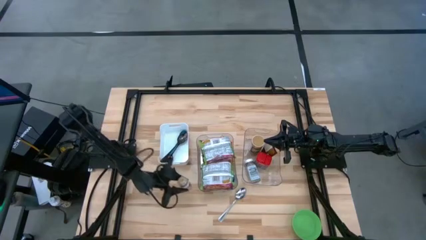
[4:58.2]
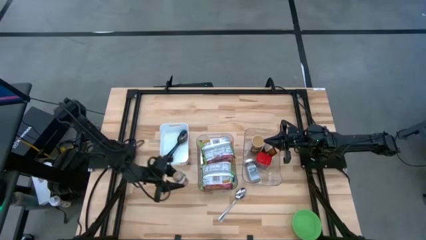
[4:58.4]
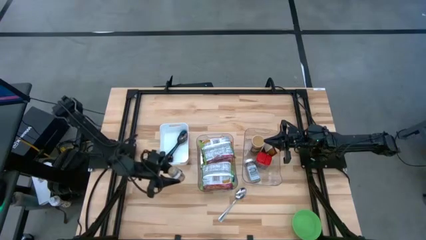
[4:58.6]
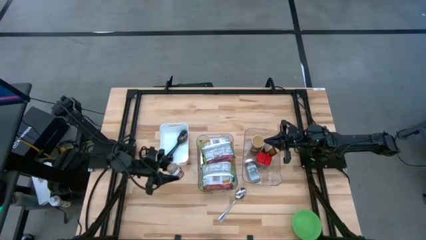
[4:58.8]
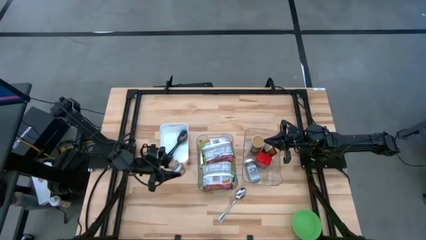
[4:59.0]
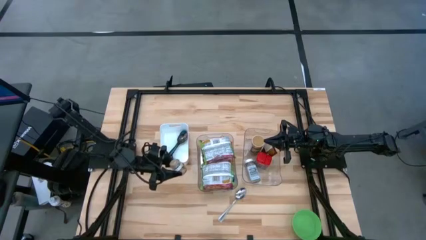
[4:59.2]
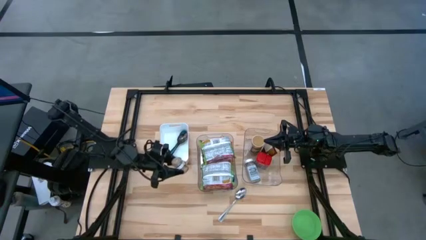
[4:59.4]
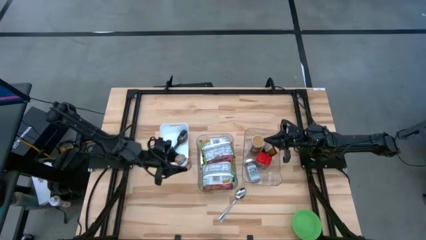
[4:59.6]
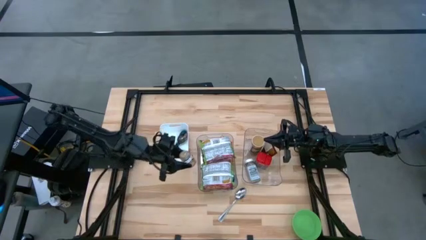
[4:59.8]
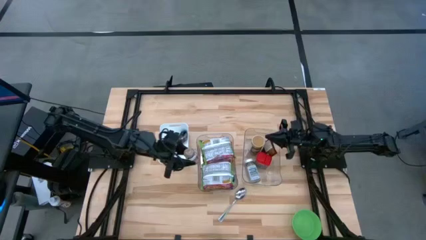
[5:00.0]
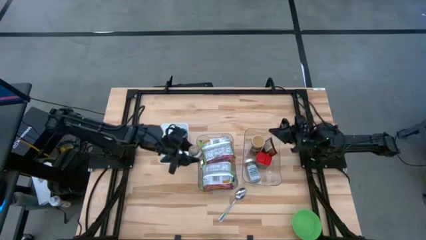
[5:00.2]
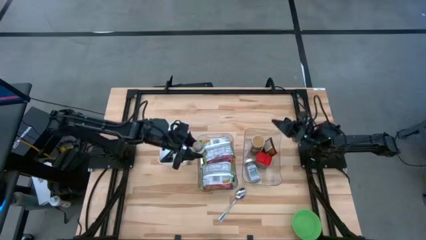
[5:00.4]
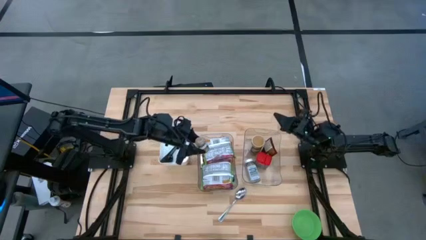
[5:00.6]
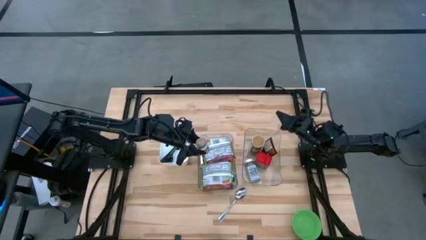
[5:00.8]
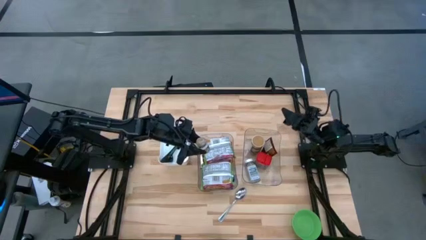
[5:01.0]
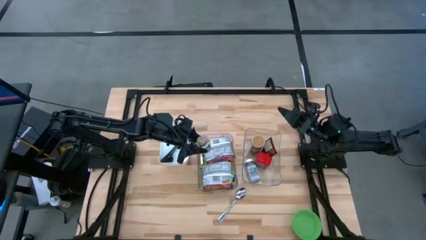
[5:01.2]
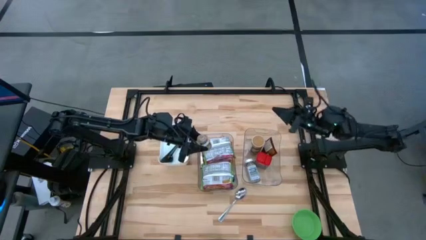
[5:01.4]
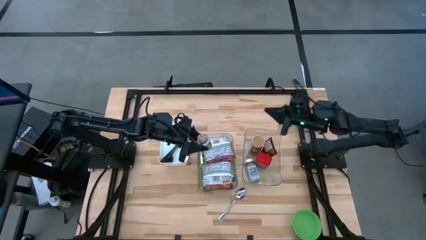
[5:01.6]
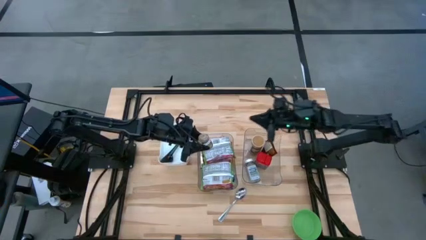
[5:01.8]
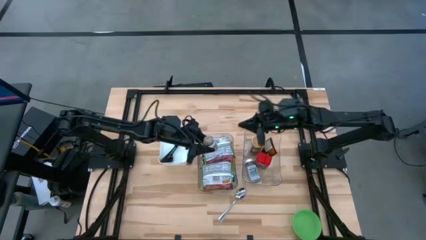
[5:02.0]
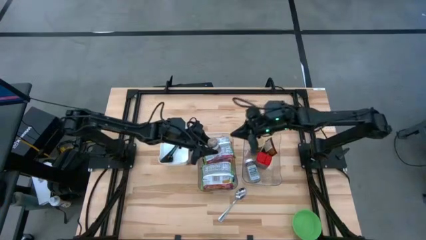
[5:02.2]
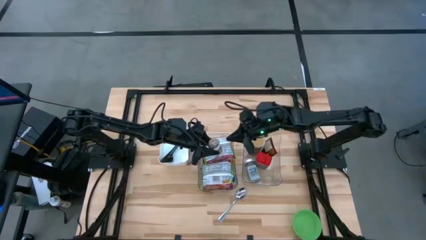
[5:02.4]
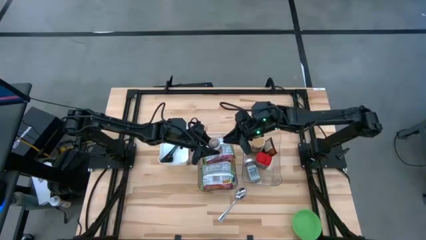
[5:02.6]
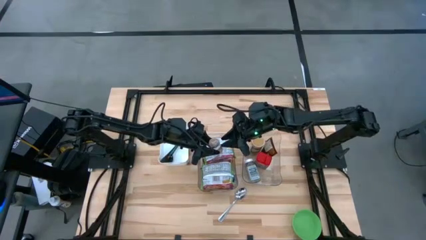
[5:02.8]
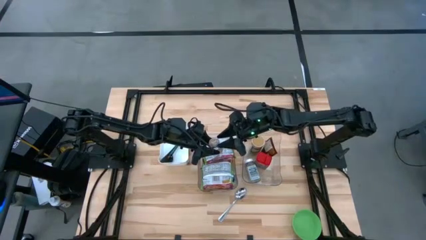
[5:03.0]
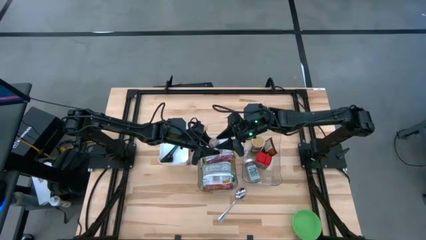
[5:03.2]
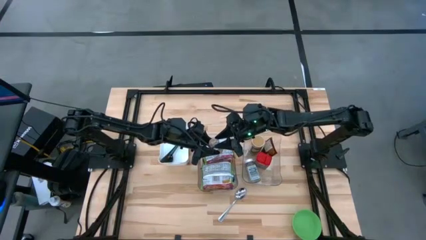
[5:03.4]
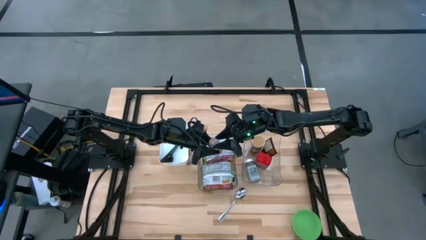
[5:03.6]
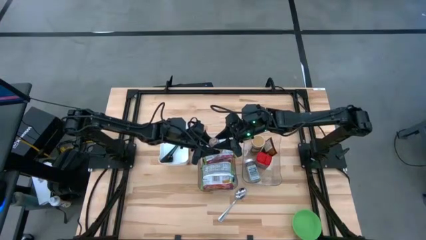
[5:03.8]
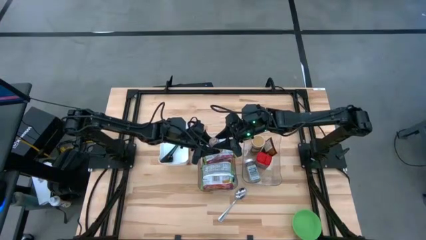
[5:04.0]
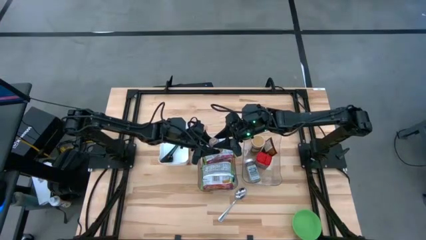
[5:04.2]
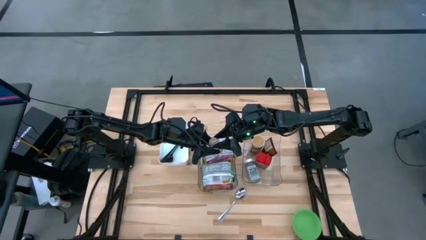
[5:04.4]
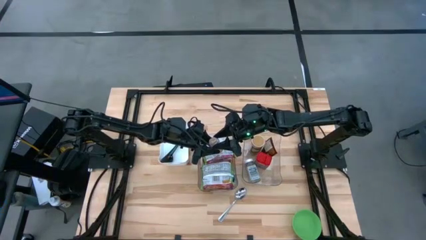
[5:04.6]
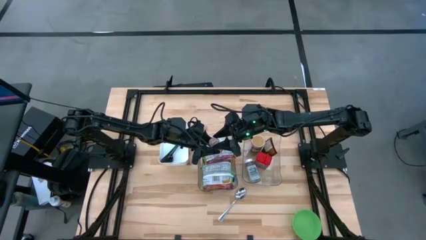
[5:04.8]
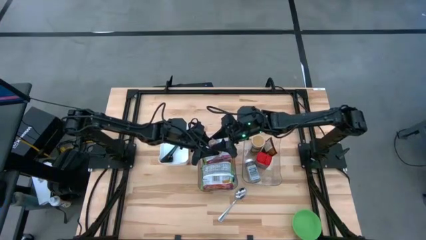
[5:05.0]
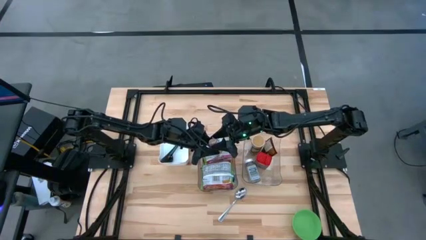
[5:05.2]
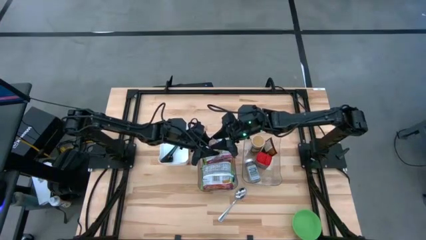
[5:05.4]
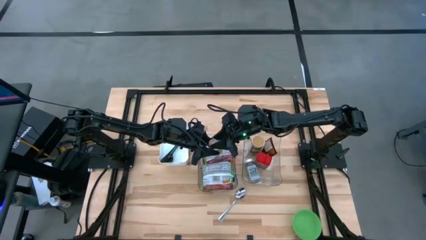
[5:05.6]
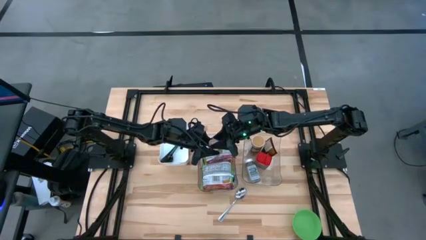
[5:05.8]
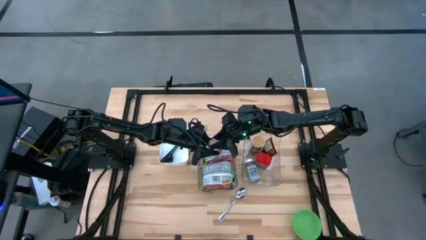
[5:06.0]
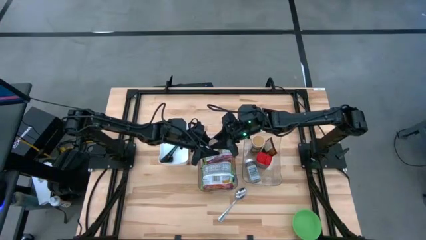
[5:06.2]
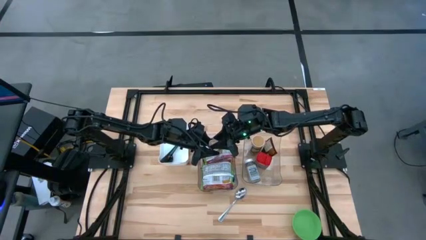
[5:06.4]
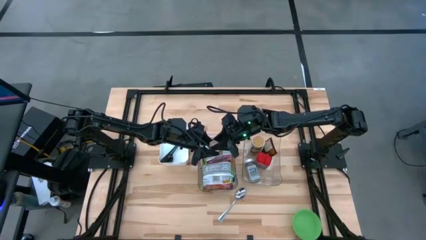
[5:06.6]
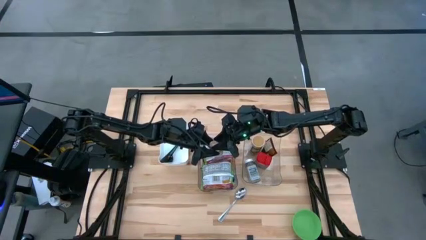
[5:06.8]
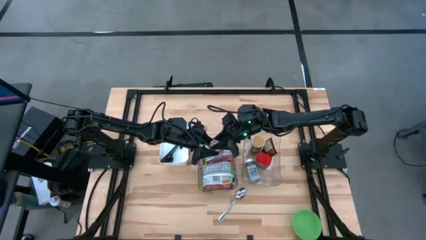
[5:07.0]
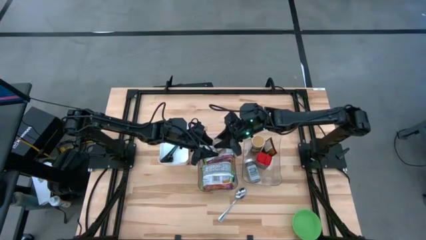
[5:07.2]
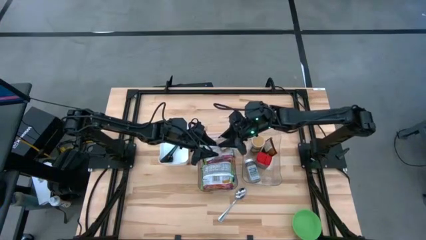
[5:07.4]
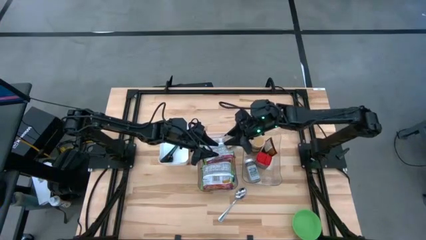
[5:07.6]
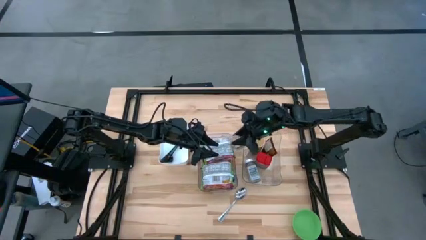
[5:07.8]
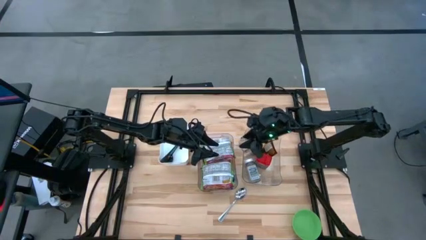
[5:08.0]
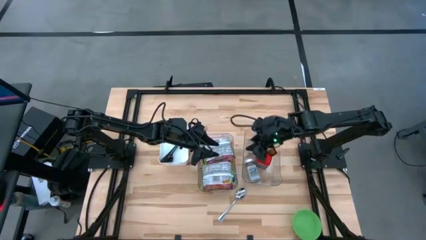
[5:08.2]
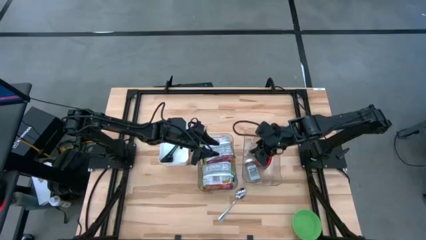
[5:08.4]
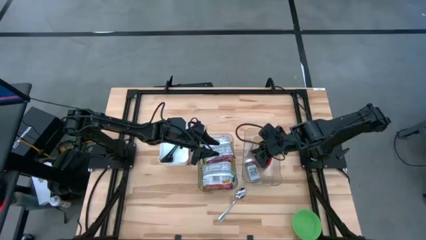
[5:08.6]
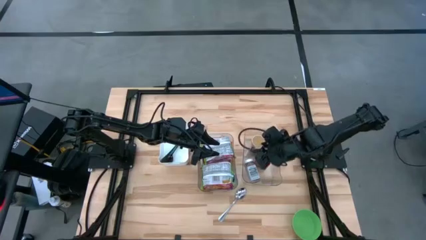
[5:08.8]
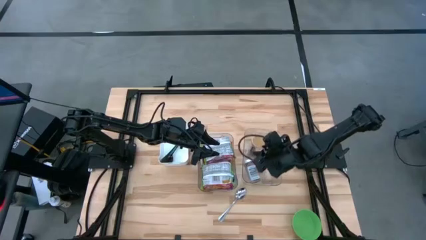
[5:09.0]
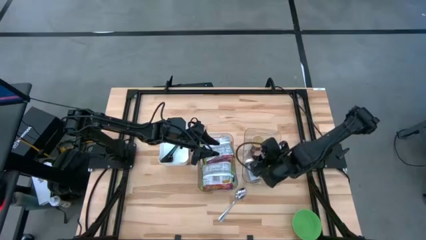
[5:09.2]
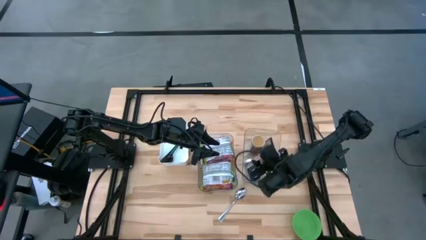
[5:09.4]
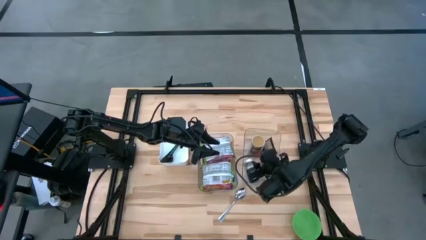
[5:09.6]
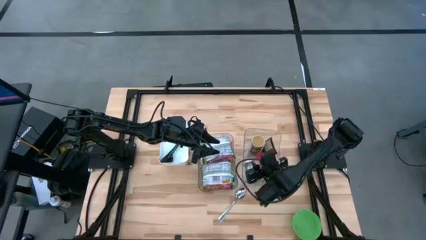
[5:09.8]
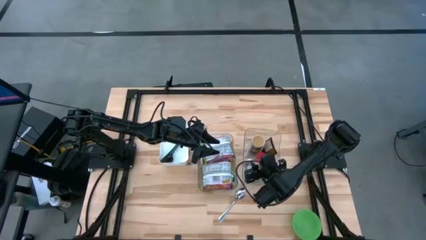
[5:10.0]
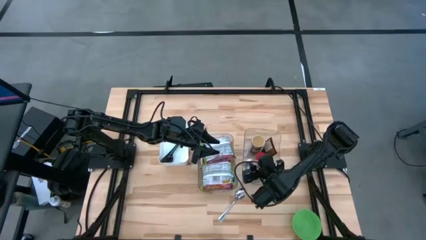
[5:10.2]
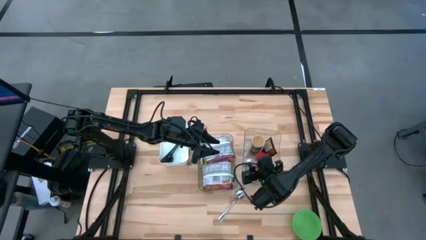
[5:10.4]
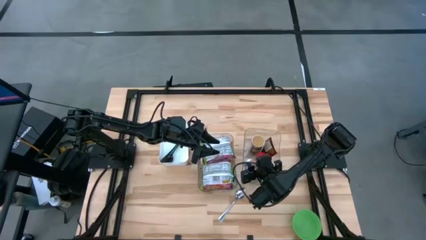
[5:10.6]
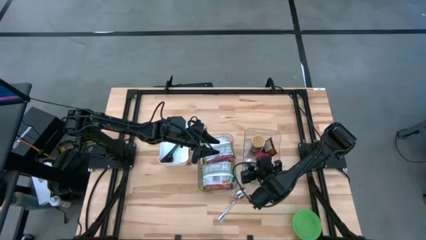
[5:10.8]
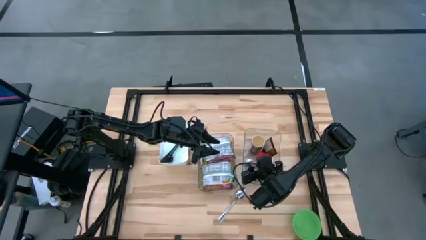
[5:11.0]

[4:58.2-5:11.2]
Task: Pick & Place Food Item
Put the brown seasoning bottle into the right transparent bin
